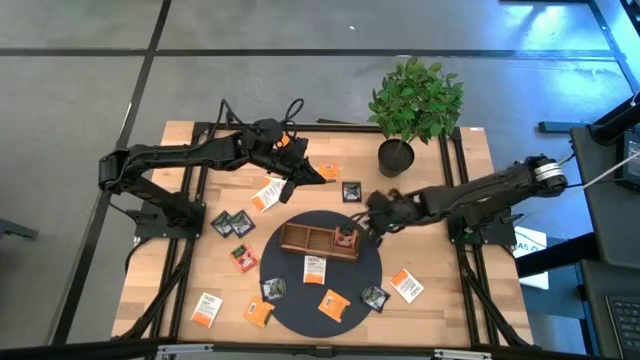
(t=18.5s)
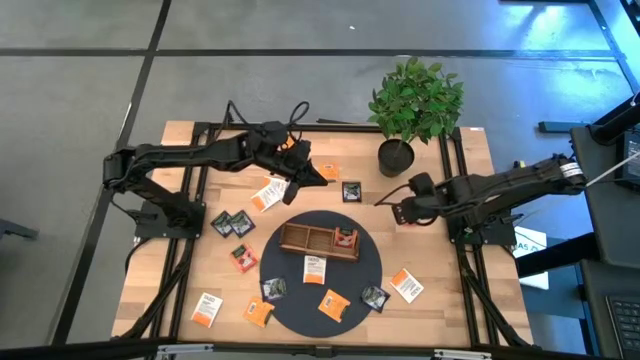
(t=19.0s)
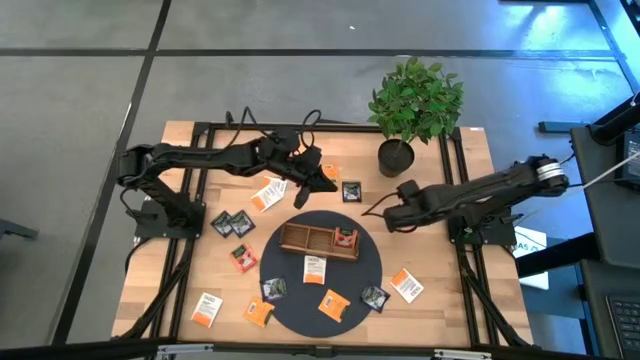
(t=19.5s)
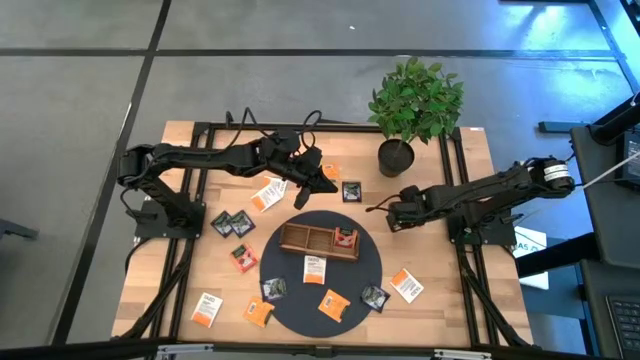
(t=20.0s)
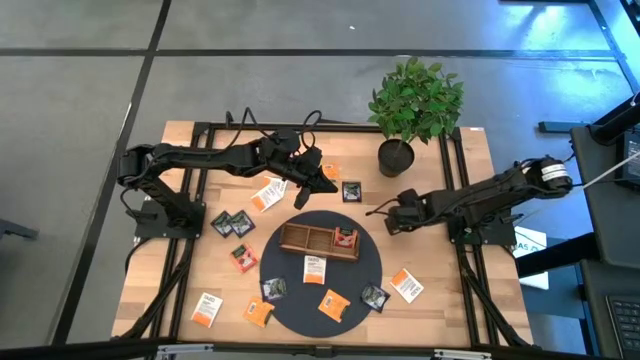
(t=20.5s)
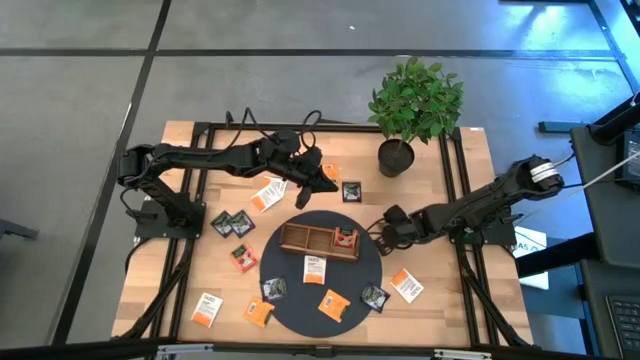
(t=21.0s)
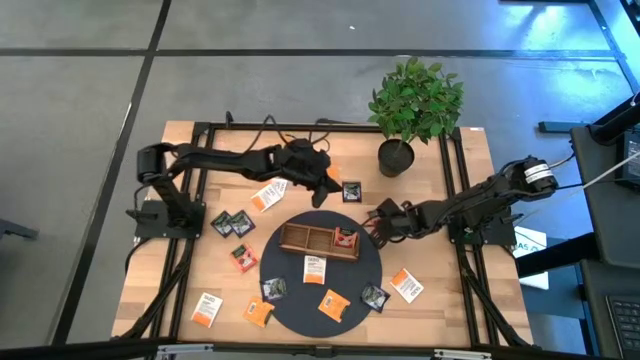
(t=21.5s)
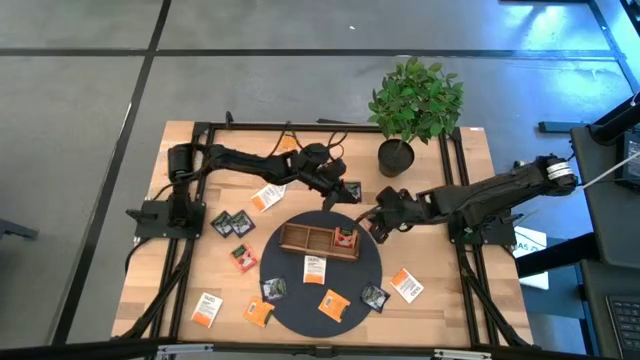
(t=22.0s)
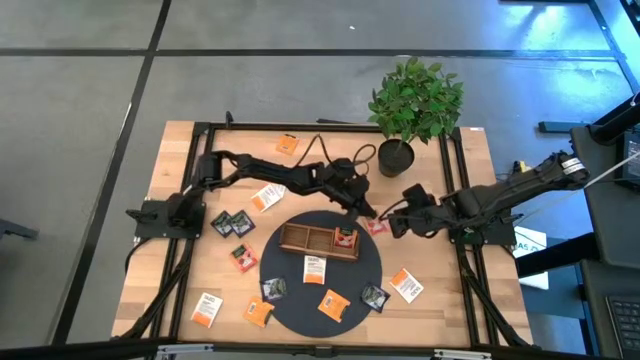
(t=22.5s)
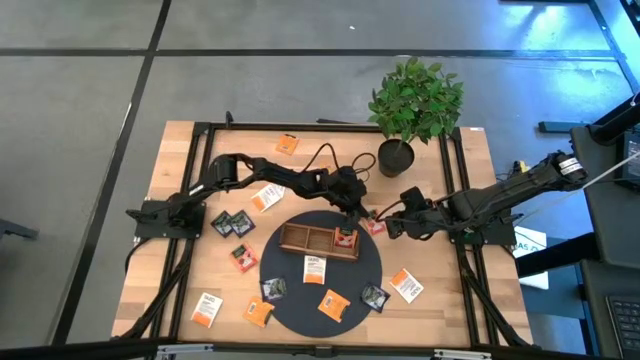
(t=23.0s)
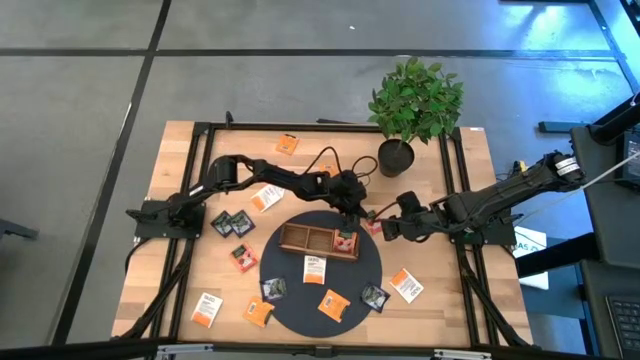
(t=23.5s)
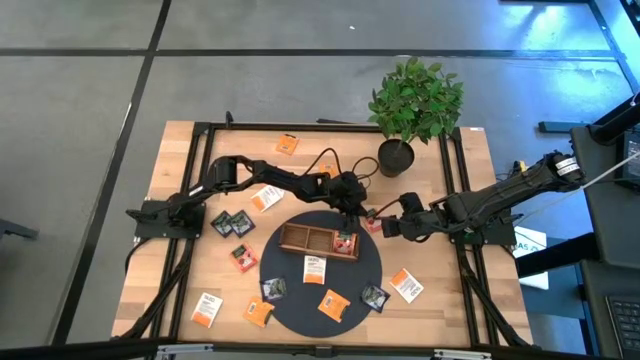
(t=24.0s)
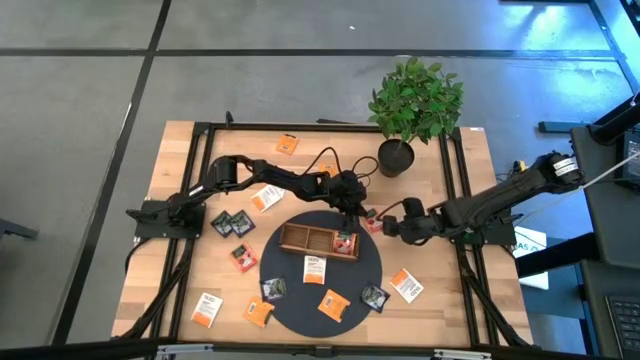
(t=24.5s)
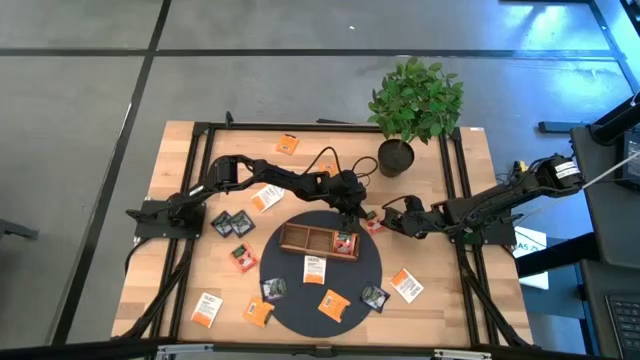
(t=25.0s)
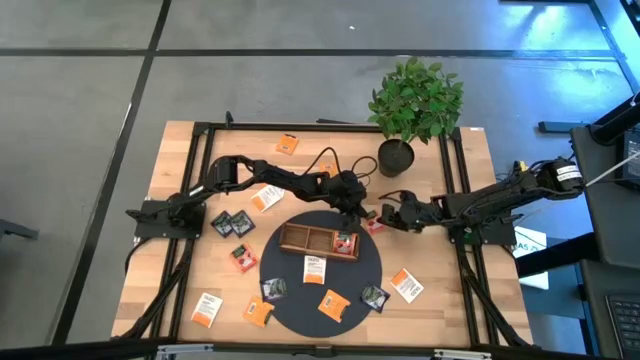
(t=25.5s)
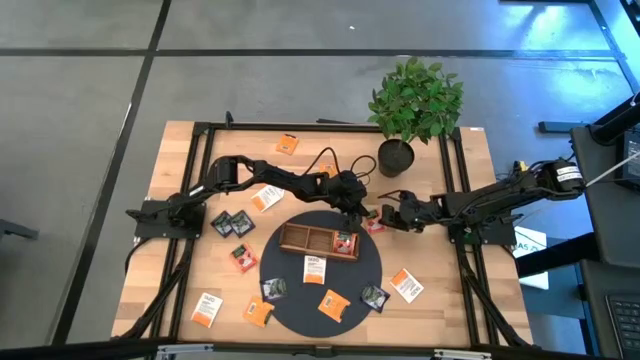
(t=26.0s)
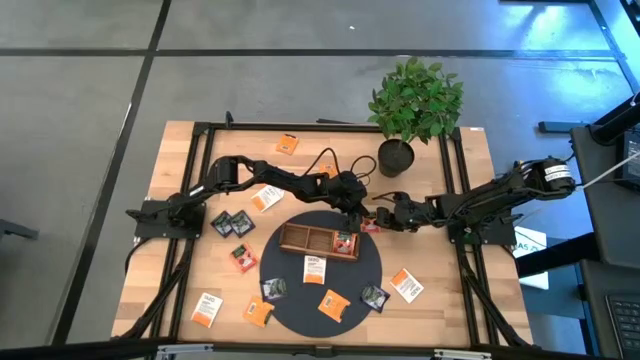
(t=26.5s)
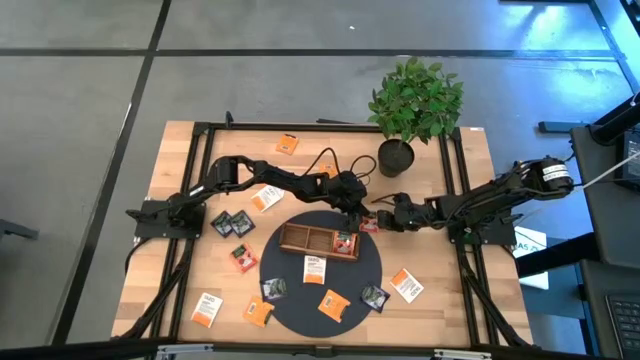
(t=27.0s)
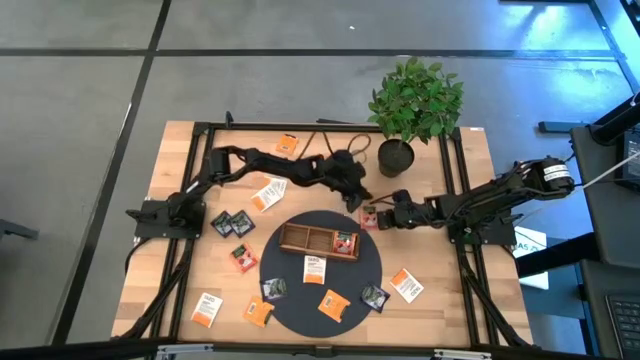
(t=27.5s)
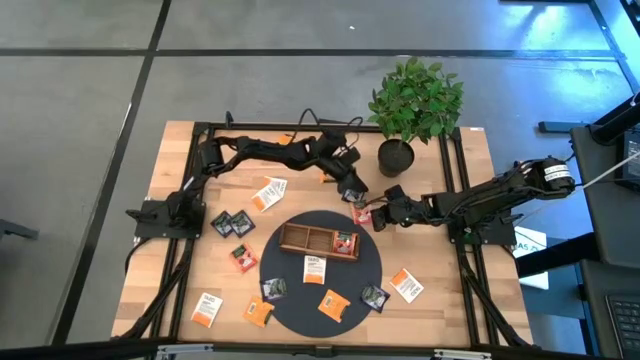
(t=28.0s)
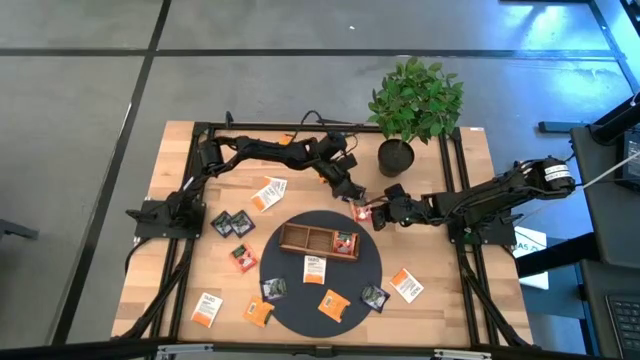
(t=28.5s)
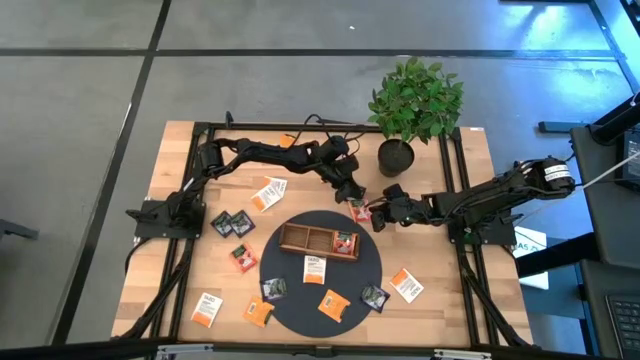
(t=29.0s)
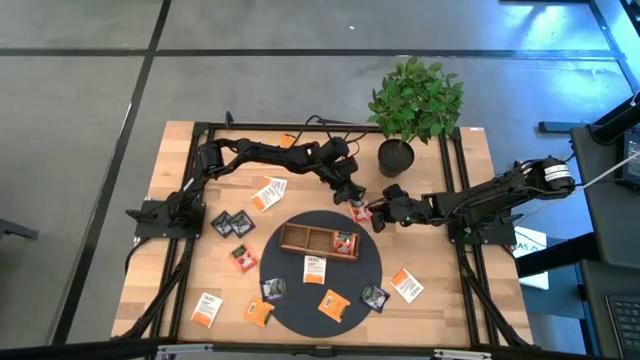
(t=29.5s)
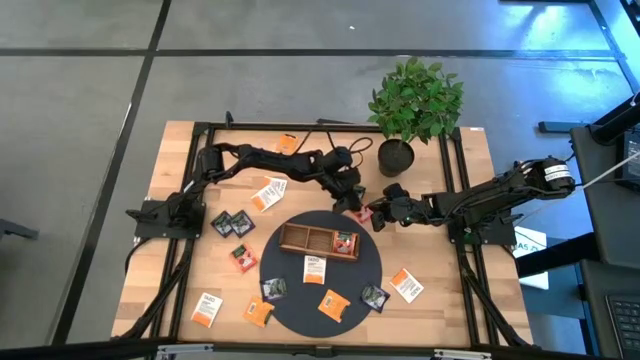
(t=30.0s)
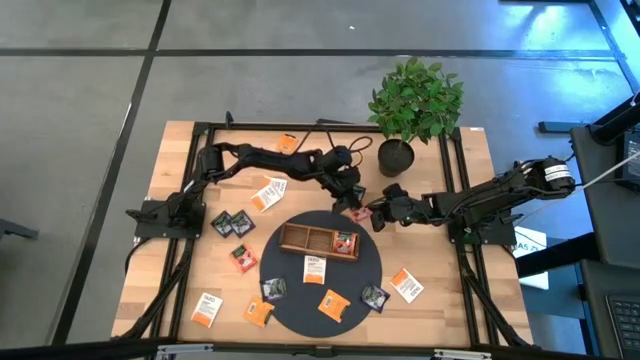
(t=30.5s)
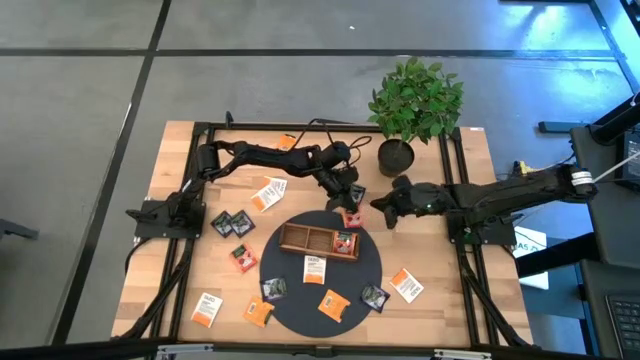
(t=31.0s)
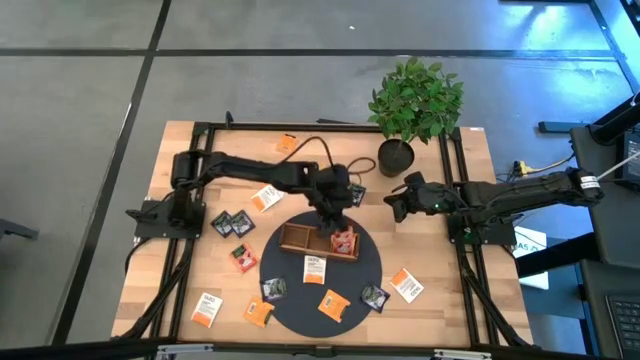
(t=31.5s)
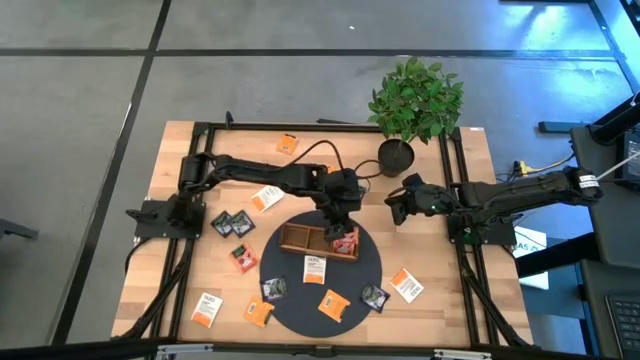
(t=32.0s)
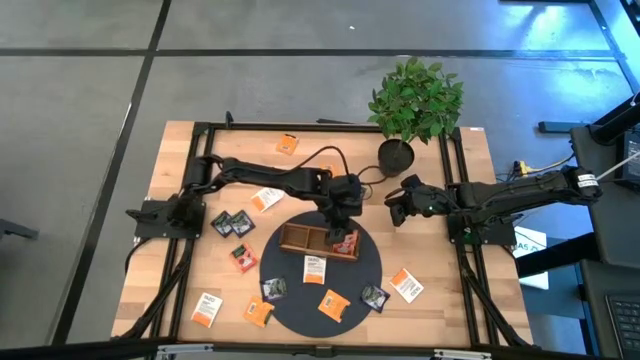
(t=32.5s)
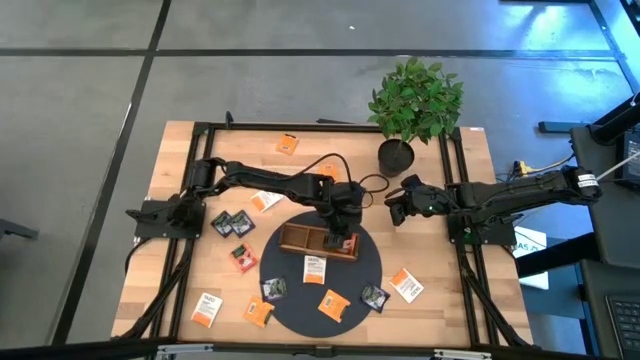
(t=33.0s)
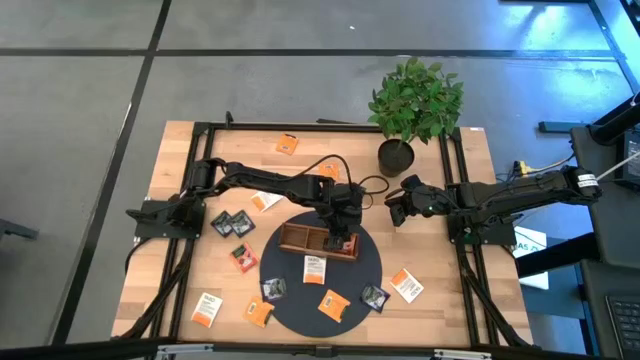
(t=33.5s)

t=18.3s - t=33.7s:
Task: Pick & Place Tea
Put the orange tea bag into the right section of the wooden organizer

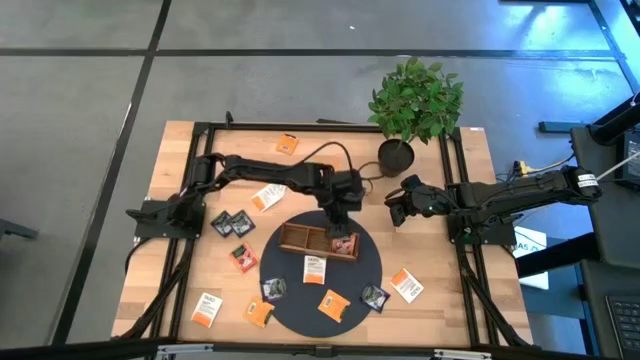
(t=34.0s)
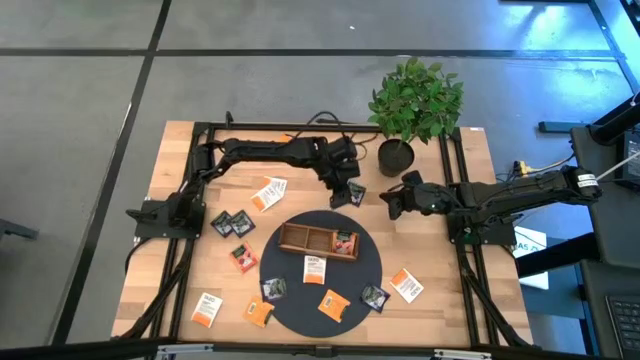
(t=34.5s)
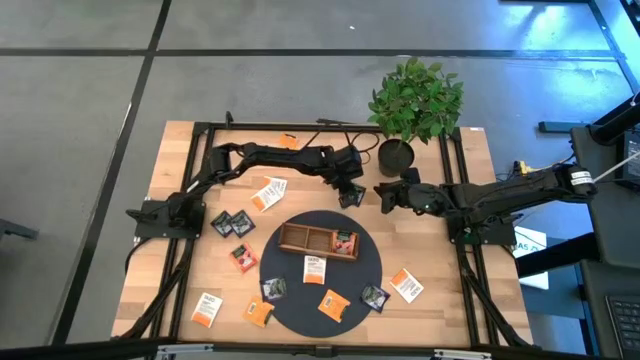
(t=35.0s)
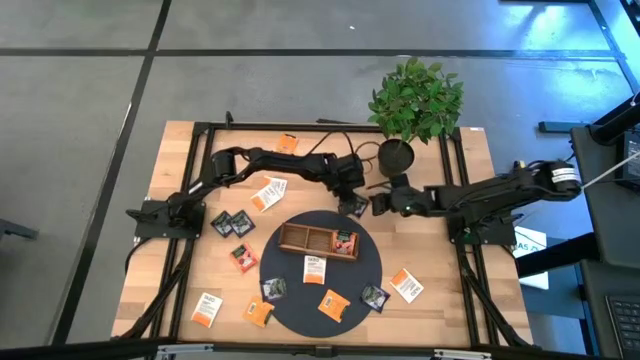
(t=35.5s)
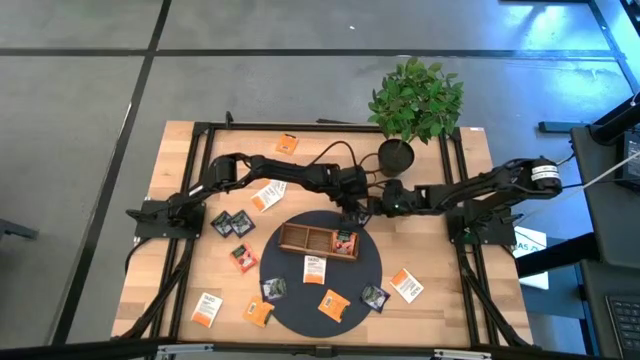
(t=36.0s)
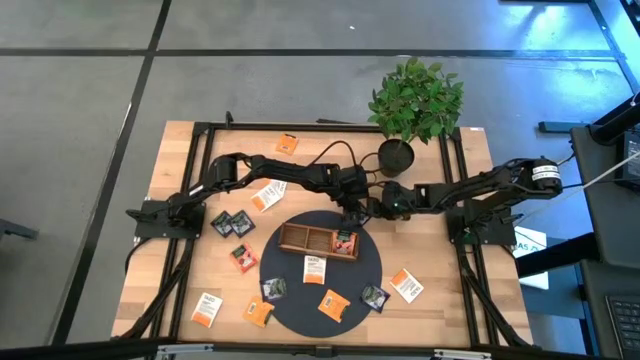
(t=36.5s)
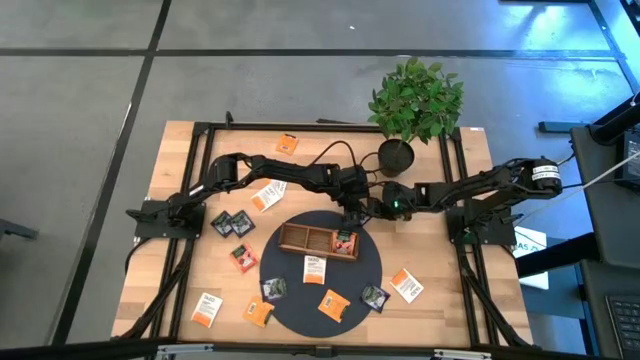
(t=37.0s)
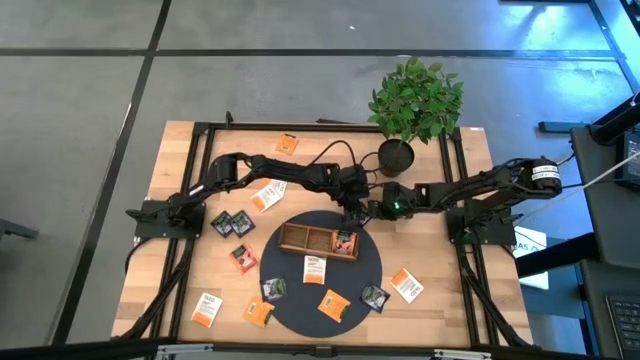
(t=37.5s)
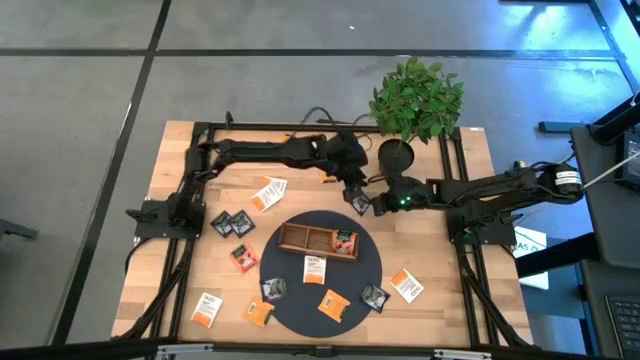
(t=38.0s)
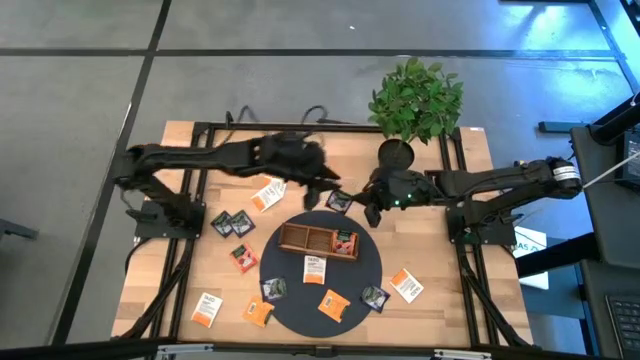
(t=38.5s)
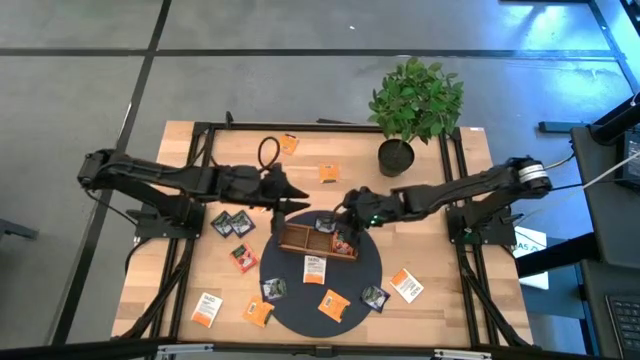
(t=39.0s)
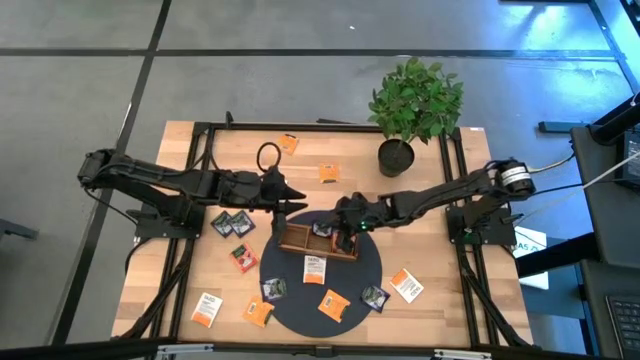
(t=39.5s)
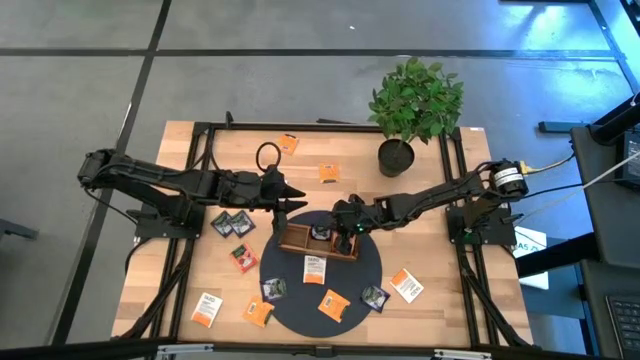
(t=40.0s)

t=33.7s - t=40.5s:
Put the black tea bag into the middle section of the wooden organizer
